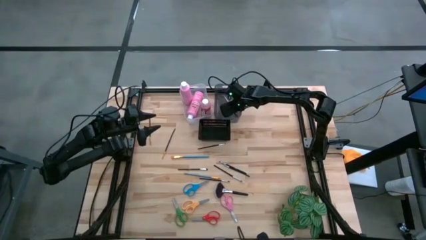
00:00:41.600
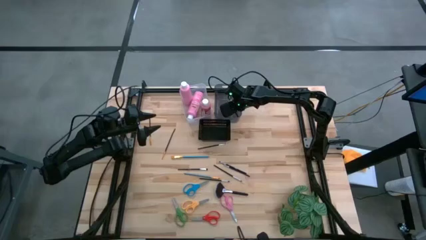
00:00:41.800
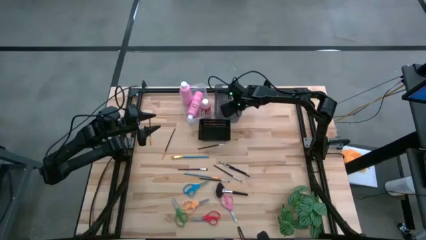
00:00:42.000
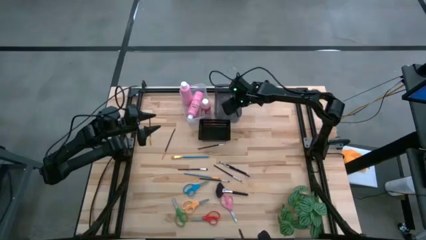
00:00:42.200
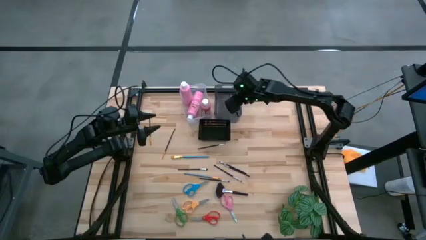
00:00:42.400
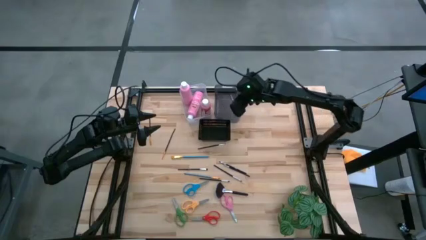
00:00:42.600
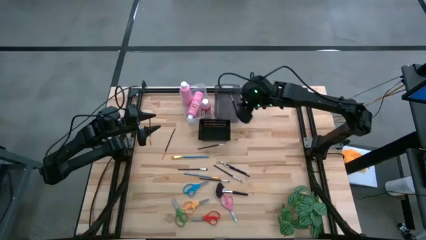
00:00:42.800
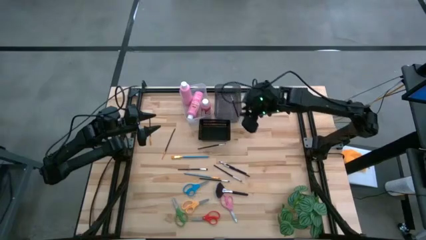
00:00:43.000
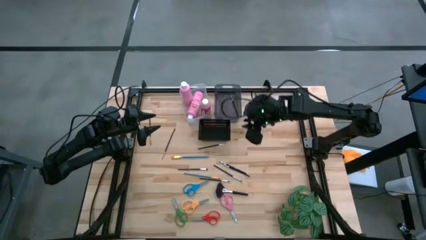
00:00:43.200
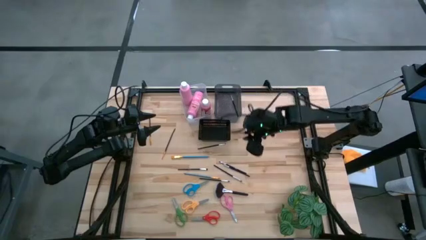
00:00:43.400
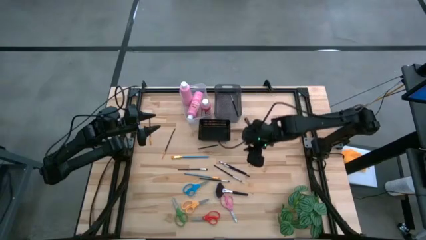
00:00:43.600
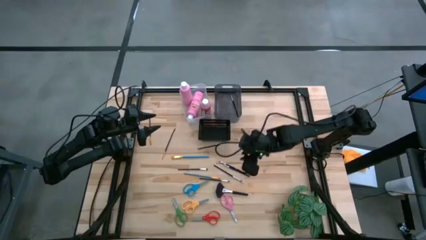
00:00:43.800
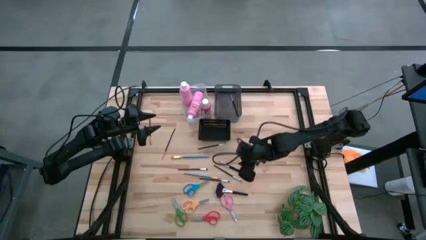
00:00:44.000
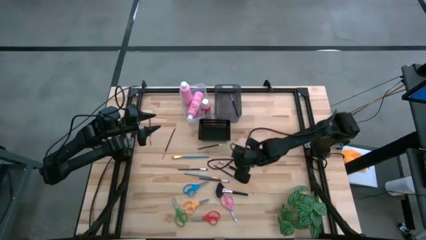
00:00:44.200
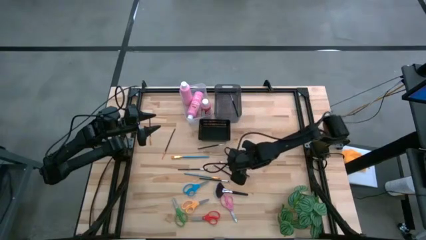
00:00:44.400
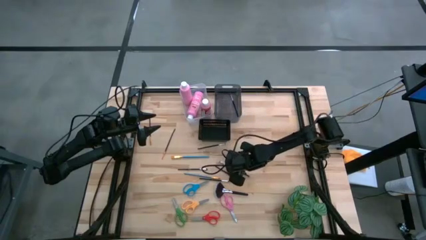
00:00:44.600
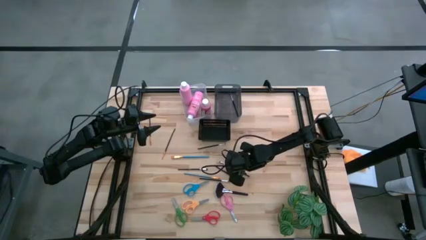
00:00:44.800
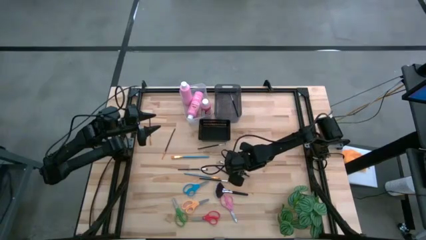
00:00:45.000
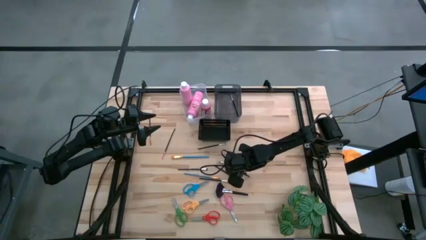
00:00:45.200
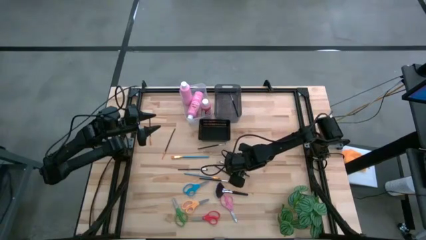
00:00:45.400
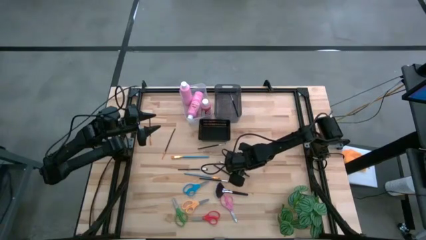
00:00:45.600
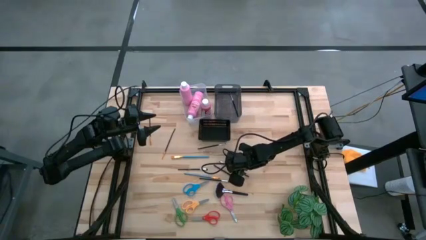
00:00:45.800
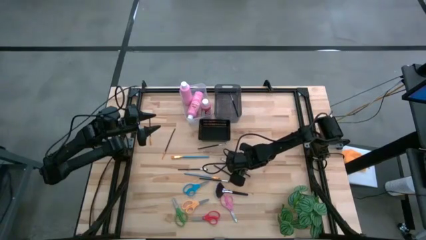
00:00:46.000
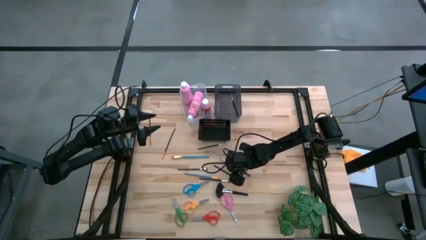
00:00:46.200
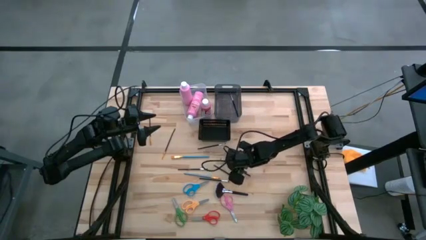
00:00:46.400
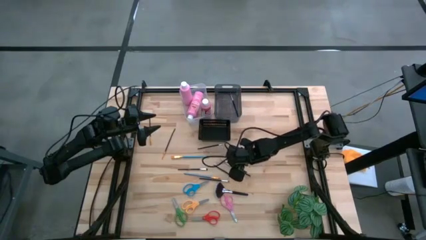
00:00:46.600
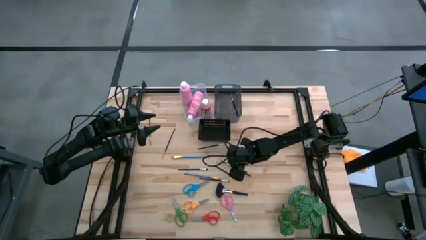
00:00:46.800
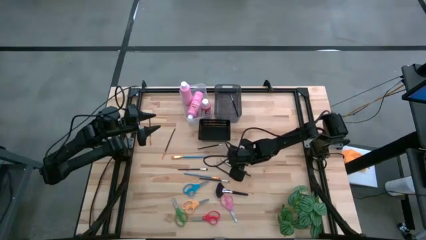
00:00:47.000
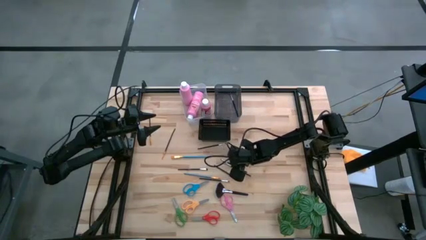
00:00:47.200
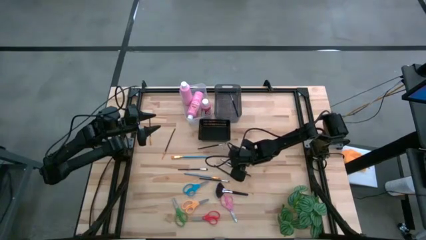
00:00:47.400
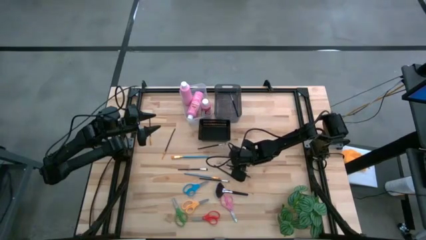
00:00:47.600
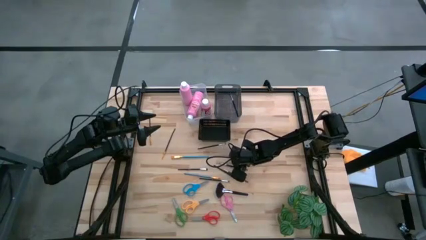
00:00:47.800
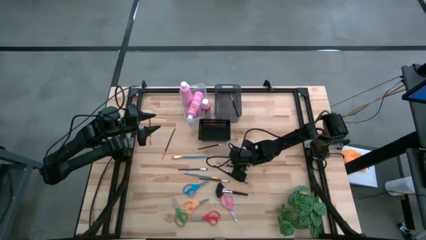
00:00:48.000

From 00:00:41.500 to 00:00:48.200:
Task: Pick & Place Paint Supplies
Put the black paint brush into the gray bin

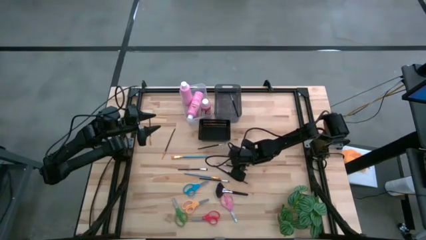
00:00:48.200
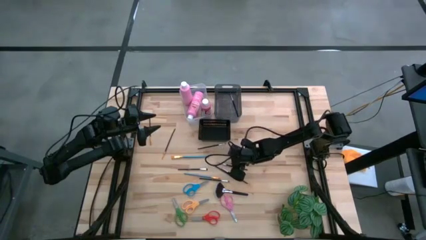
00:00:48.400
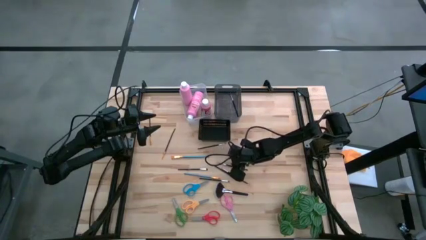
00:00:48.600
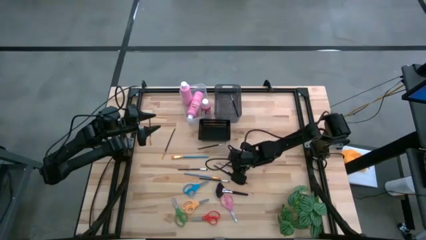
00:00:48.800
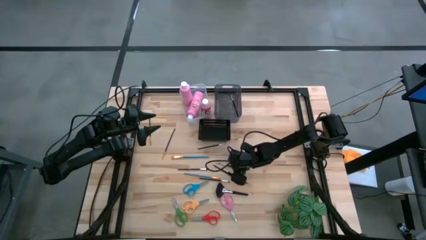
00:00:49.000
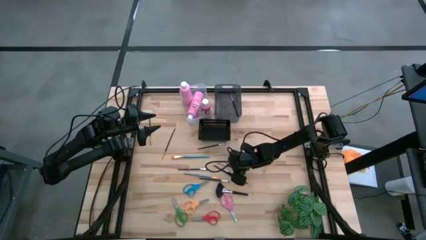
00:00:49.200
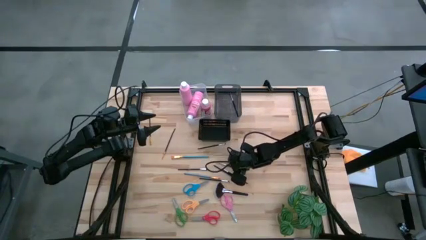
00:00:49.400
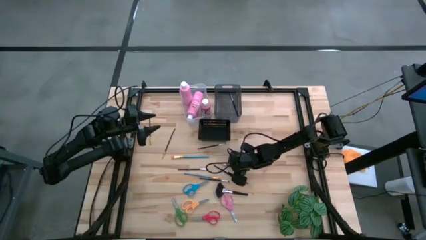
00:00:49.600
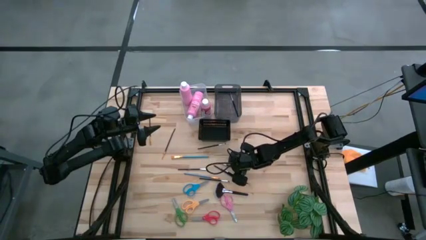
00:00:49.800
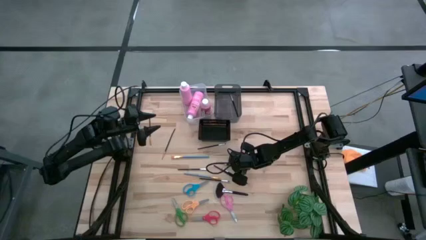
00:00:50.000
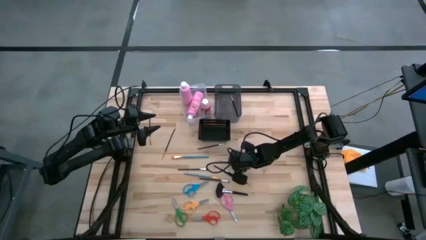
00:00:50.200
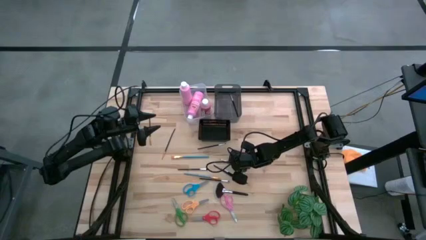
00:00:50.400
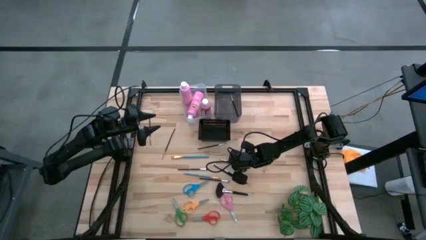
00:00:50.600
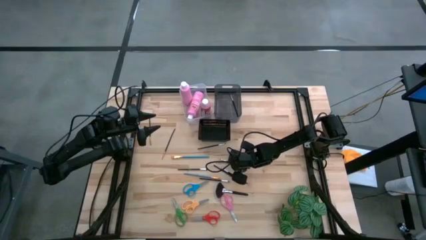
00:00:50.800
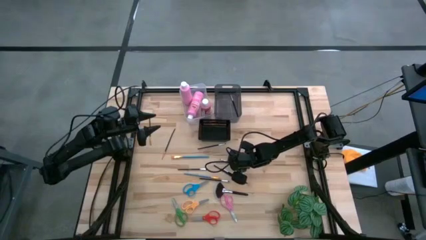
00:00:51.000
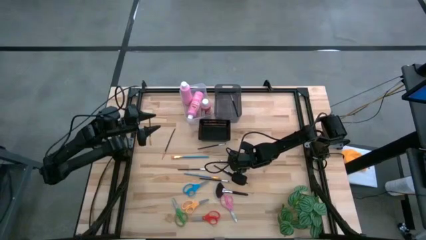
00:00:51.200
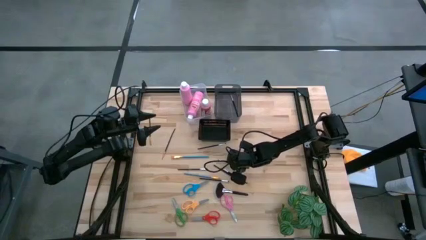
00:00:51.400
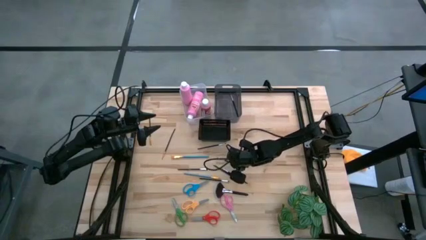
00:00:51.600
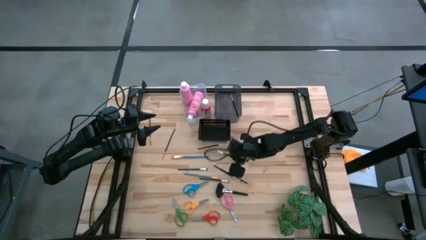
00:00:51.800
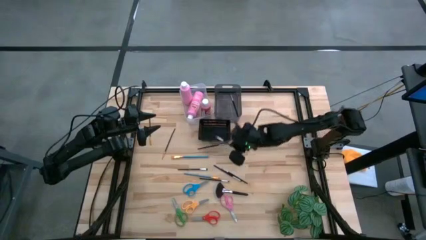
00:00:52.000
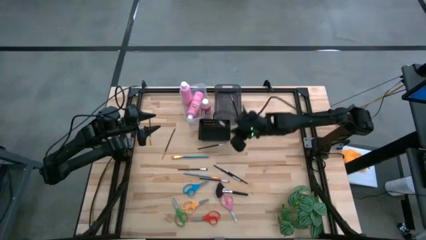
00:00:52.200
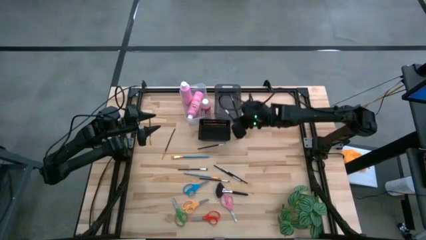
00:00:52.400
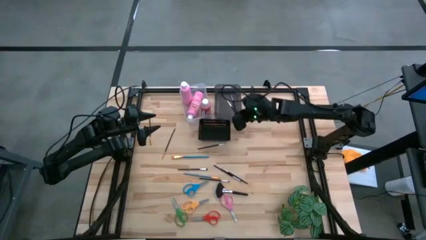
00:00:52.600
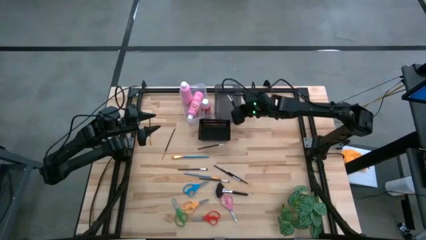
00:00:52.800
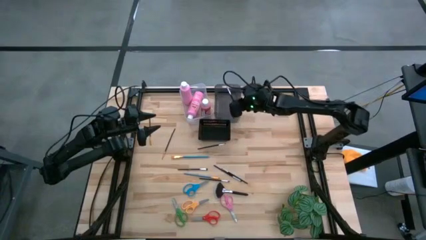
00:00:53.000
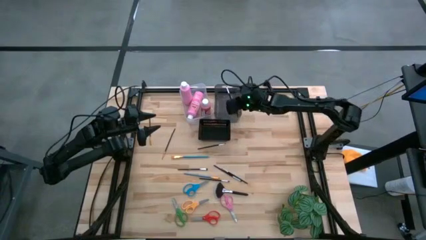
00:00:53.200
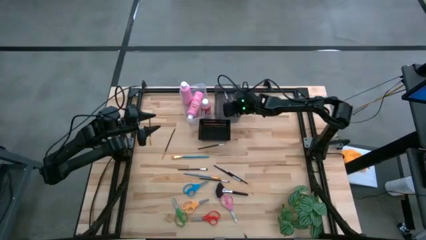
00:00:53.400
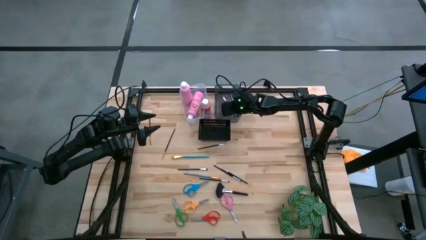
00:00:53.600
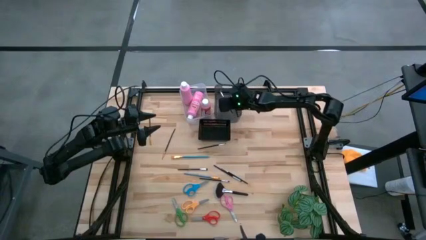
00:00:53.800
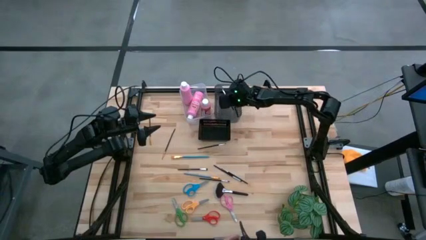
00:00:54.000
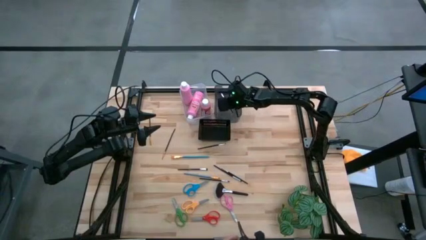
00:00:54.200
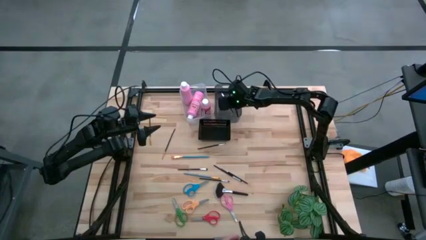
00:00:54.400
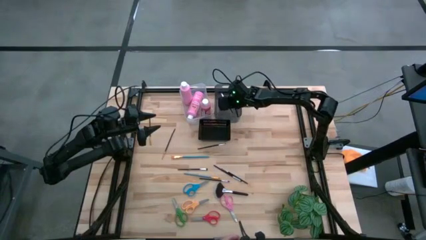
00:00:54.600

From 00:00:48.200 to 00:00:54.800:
Put the black paint brush into the gray bin

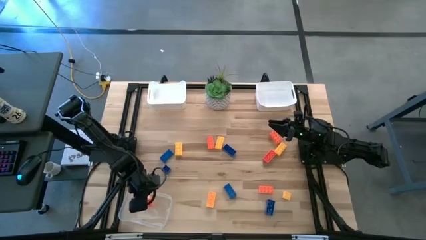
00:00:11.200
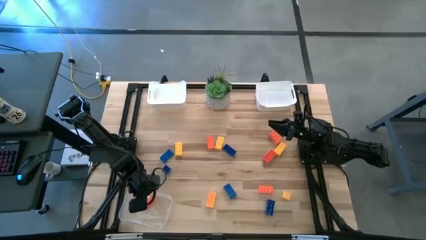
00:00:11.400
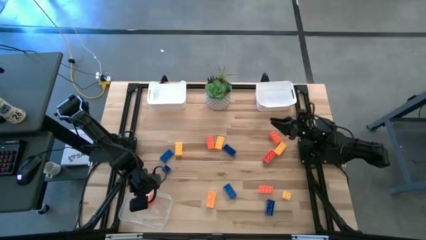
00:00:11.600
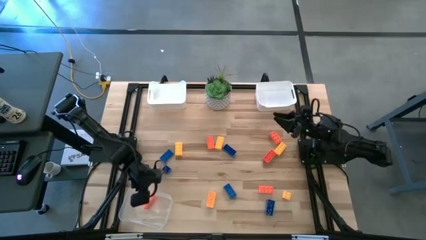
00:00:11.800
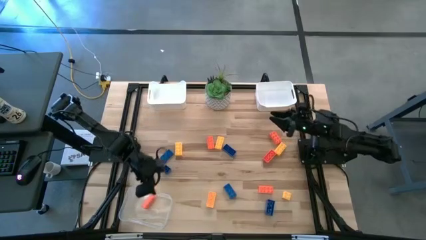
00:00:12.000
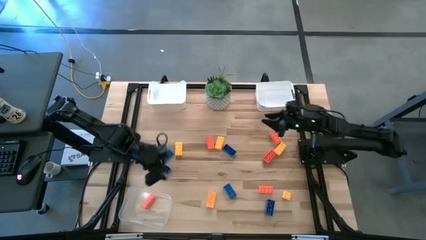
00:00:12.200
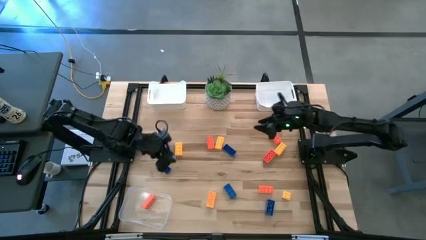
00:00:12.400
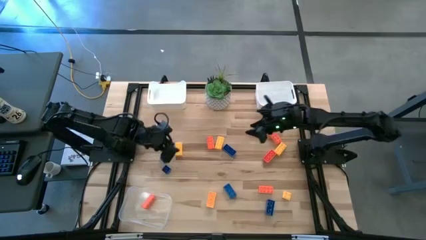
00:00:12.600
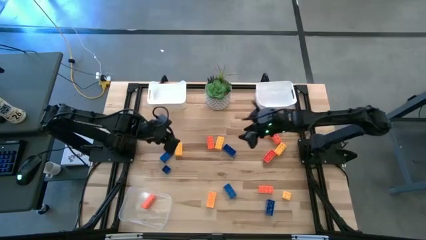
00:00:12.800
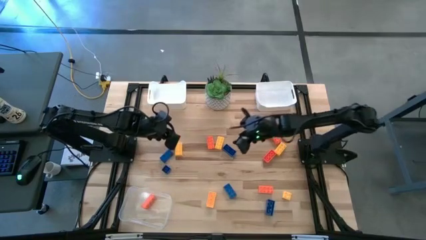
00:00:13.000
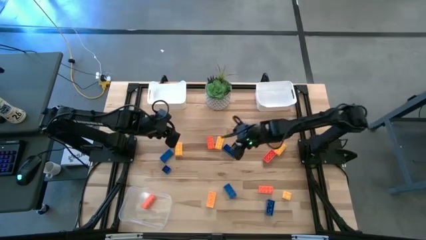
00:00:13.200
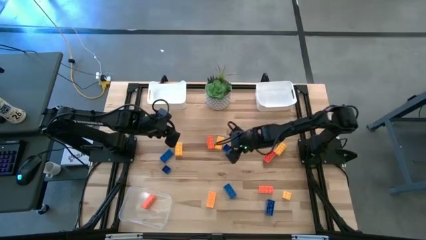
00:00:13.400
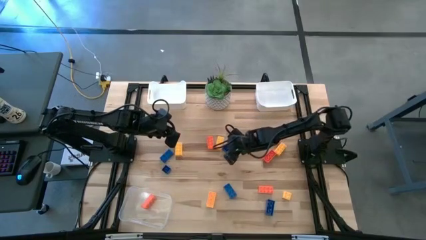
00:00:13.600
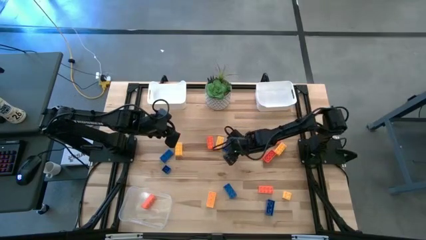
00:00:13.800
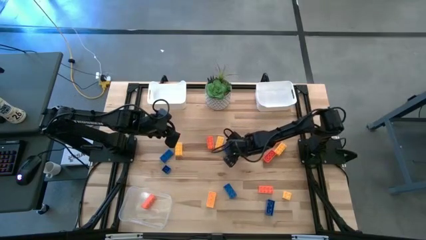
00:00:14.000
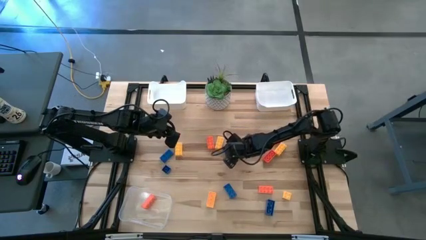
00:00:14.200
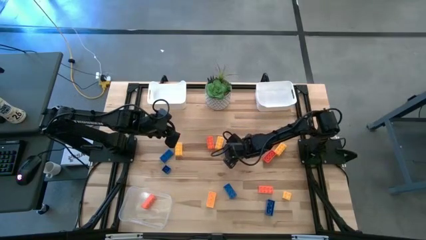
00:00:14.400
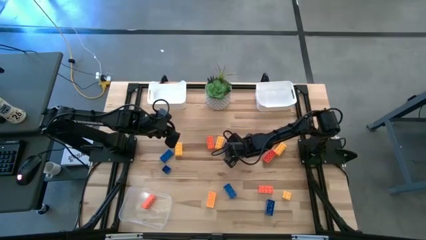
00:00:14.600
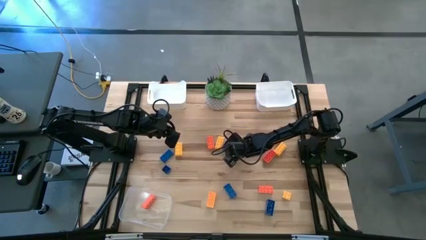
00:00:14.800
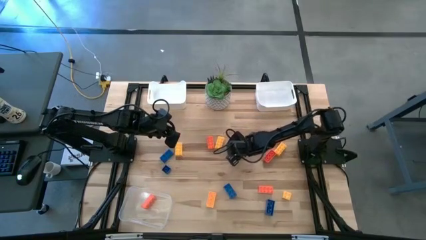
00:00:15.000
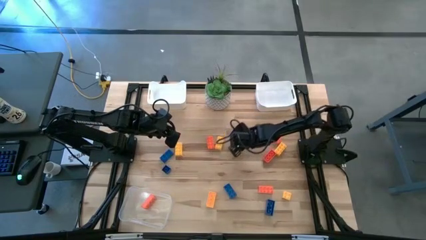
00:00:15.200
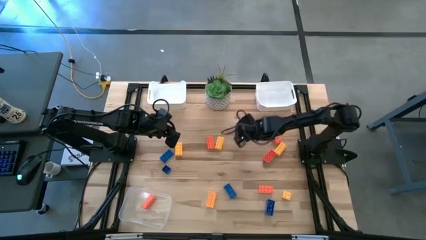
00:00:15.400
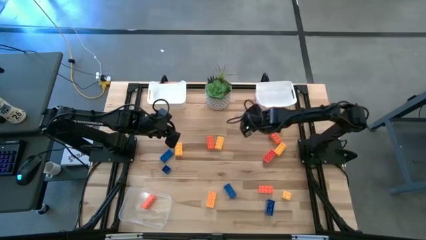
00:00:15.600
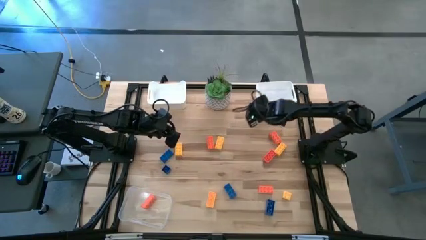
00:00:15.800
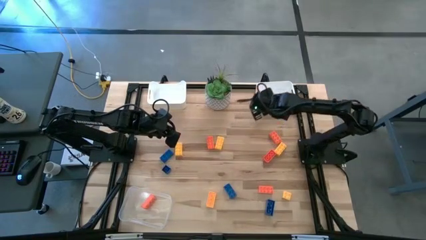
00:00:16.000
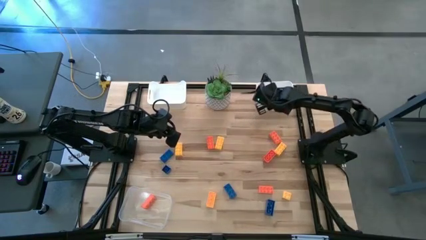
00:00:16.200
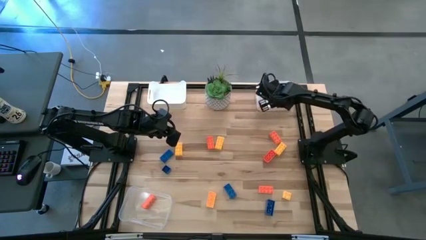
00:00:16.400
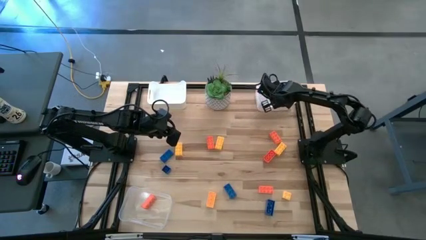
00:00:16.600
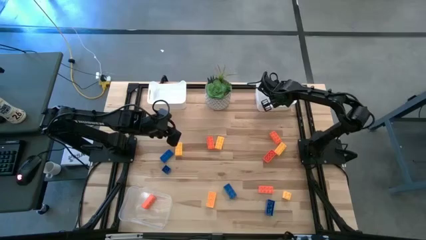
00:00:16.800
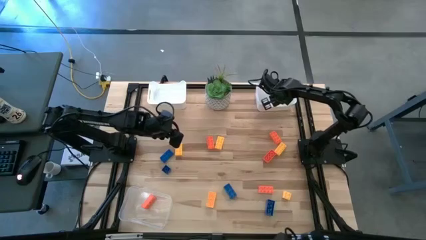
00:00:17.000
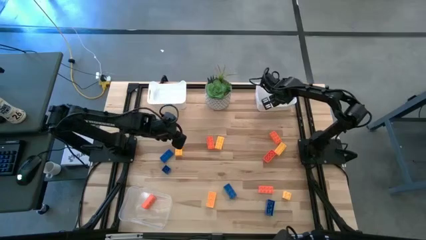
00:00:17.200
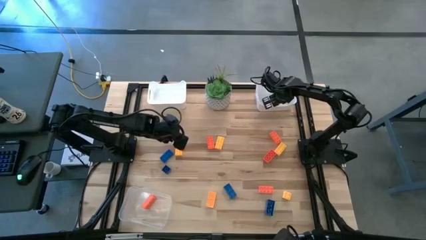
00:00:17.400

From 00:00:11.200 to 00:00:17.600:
Task: Sort & place blocks by color
Put the blue game piece into the right white bin
